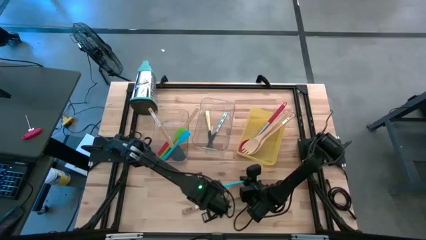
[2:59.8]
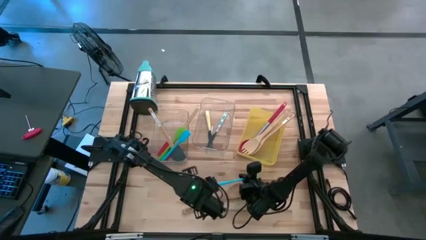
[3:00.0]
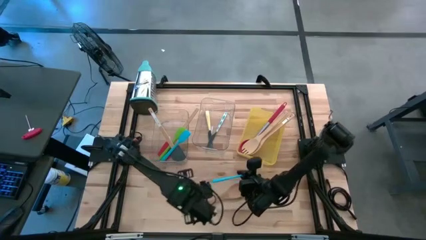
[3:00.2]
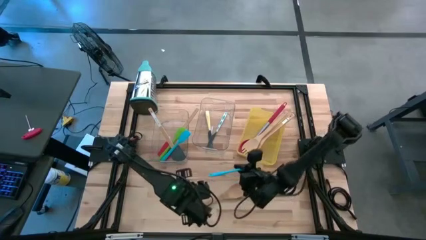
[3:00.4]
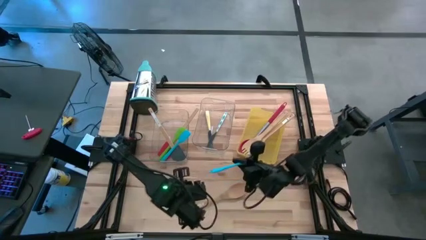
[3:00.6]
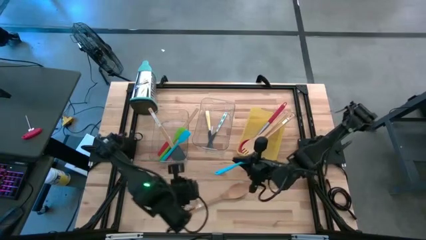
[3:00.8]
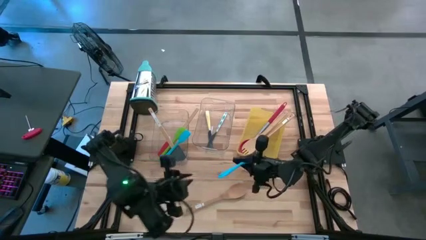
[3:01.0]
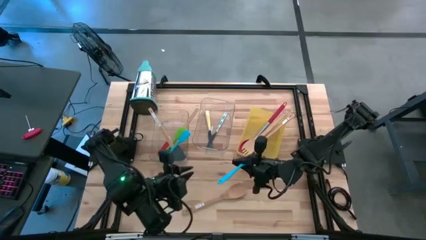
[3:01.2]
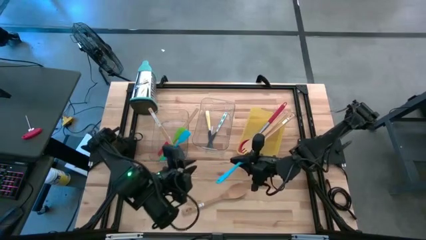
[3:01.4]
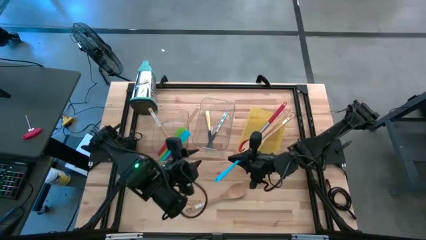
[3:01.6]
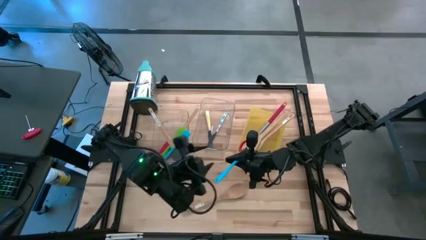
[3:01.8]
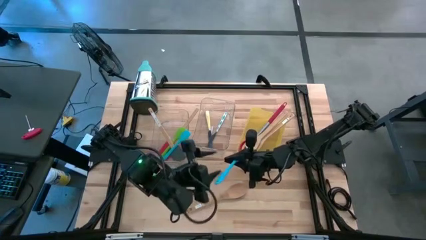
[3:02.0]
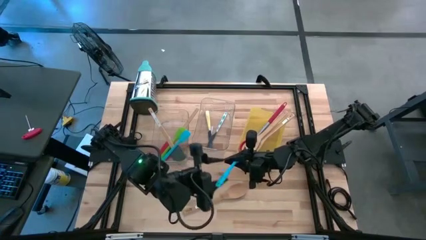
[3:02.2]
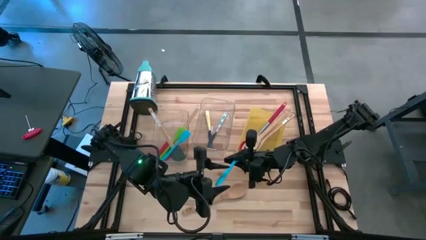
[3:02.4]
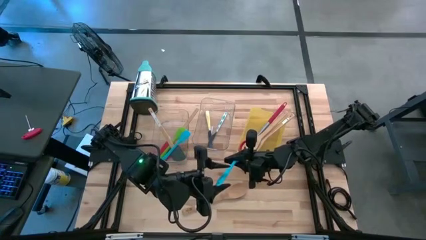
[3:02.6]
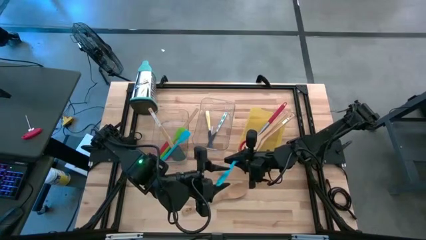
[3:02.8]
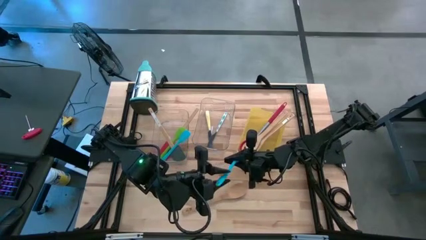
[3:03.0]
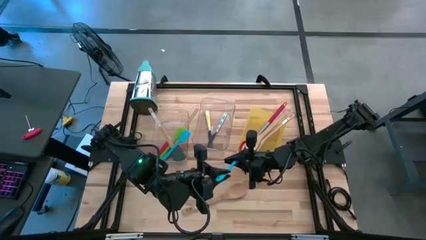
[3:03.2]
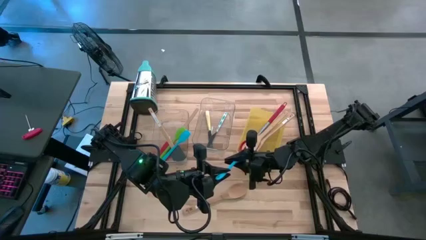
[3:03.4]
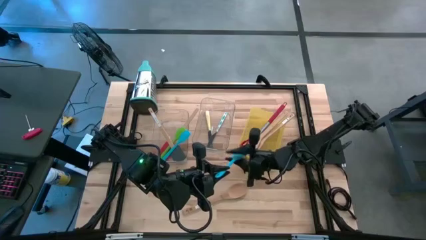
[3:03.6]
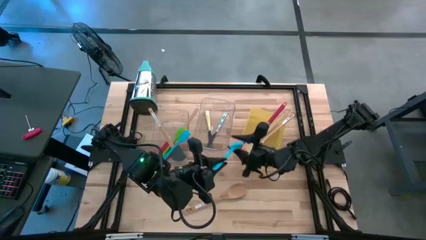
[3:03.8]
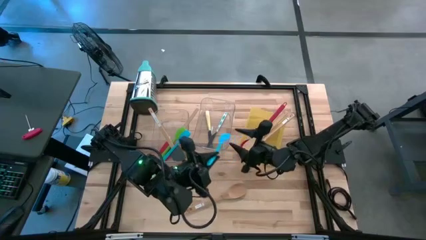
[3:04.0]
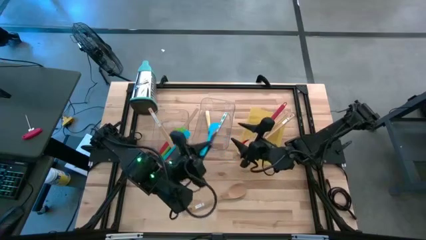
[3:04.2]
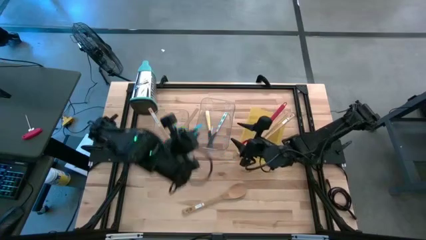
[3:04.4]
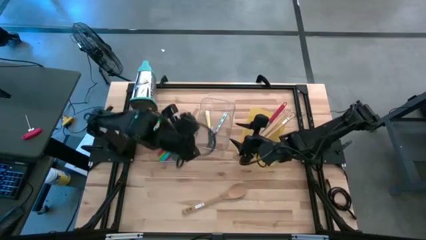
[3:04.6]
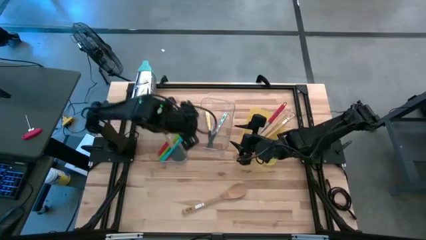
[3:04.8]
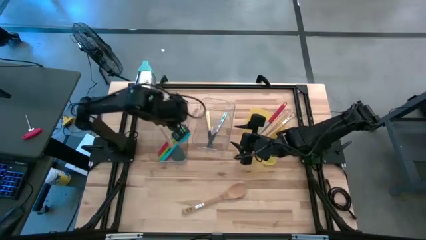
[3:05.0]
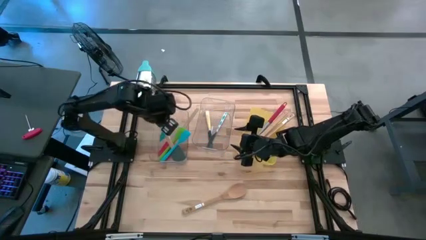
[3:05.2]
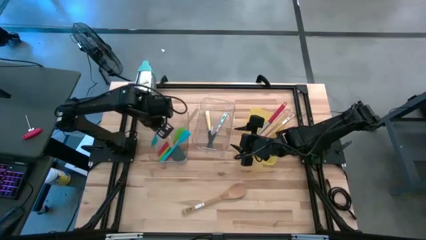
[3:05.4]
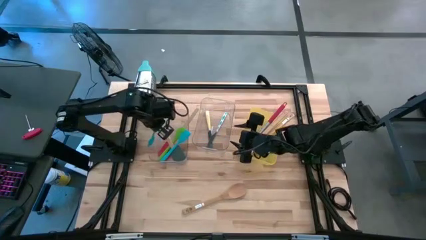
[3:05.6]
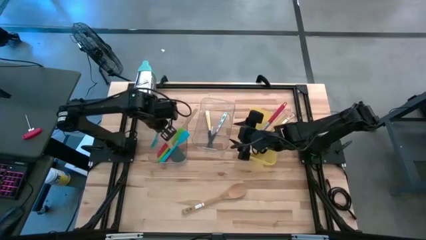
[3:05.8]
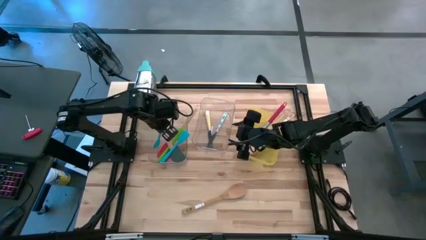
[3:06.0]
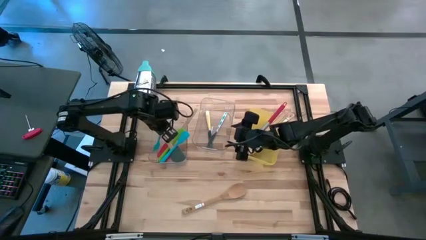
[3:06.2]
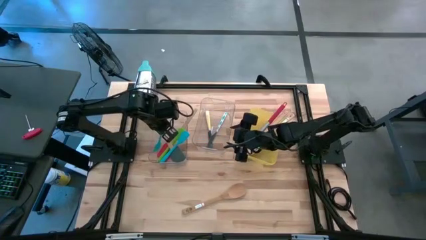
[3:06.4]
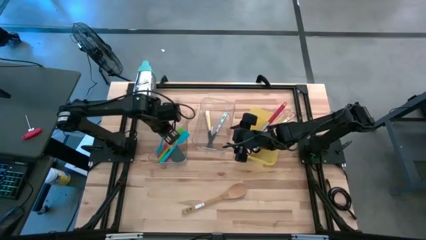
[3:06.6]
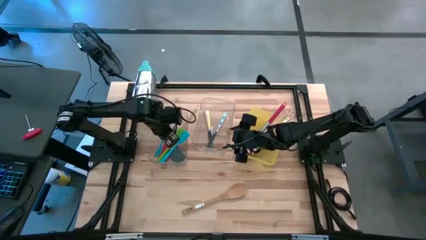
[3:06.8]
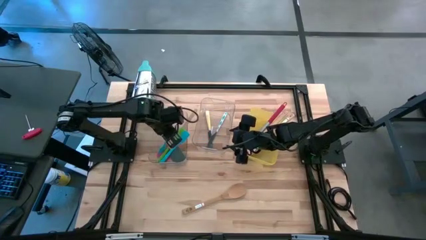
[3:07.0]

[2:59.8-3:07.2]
Task: Pick & Place Kitchen Items
Put the blue spatula into the left transparent bin

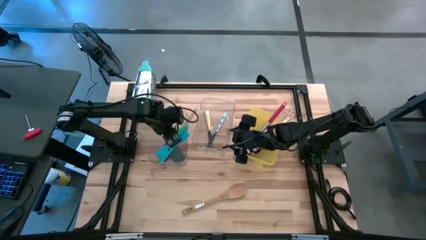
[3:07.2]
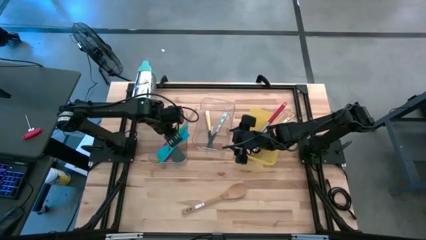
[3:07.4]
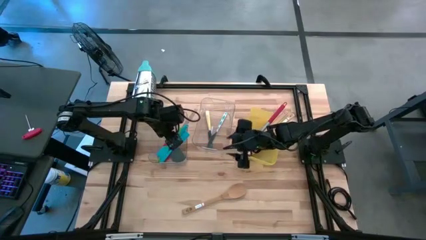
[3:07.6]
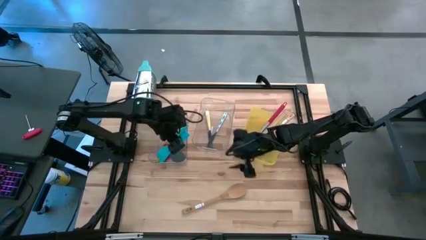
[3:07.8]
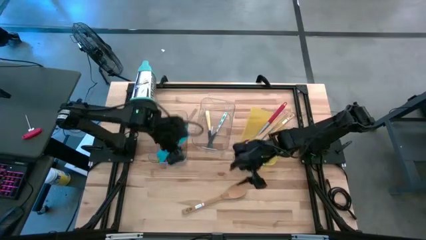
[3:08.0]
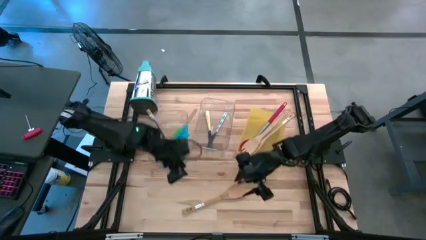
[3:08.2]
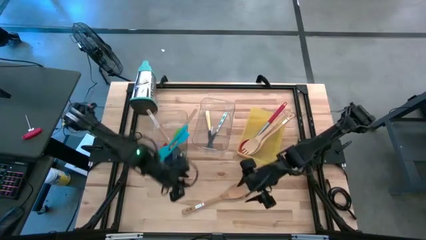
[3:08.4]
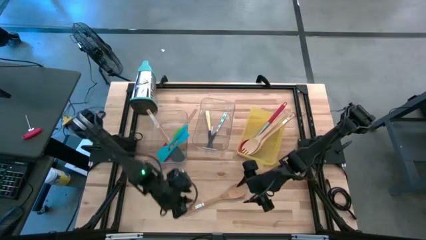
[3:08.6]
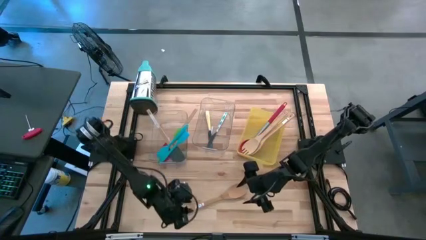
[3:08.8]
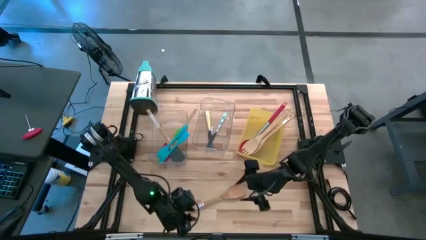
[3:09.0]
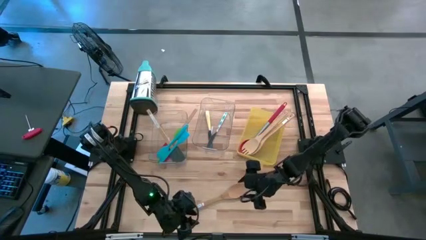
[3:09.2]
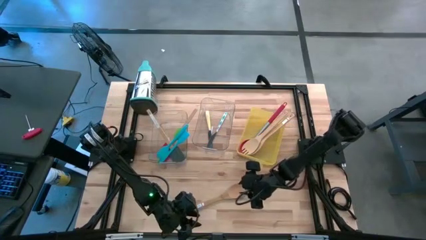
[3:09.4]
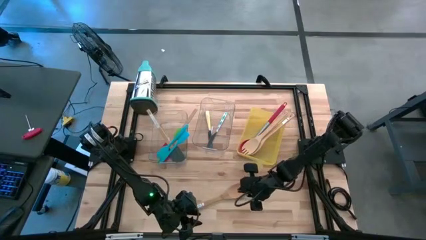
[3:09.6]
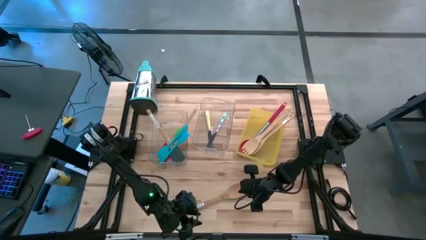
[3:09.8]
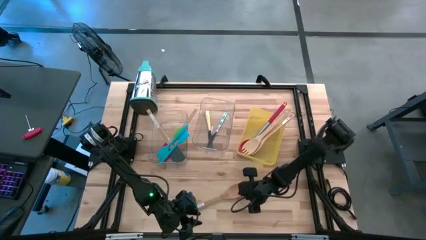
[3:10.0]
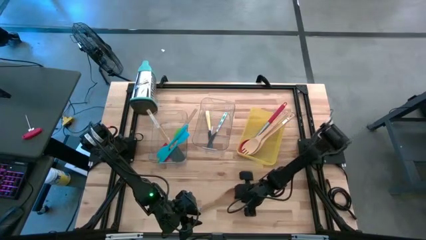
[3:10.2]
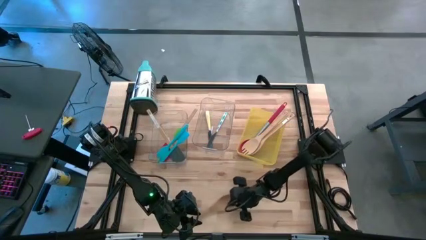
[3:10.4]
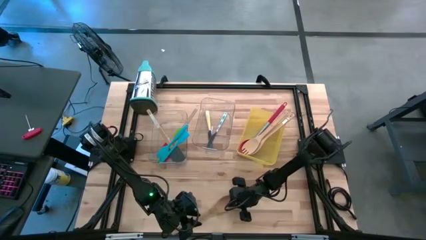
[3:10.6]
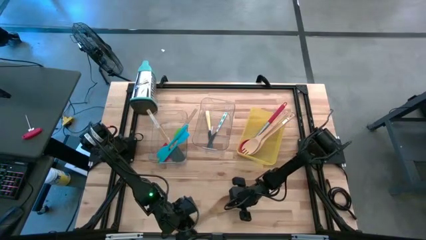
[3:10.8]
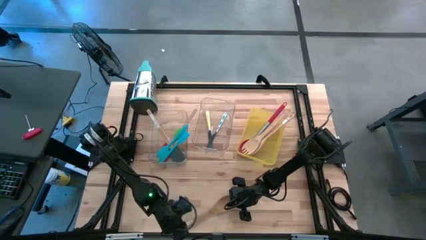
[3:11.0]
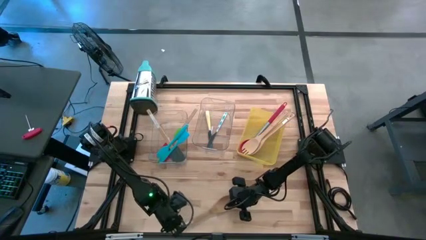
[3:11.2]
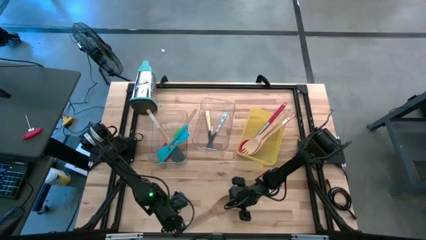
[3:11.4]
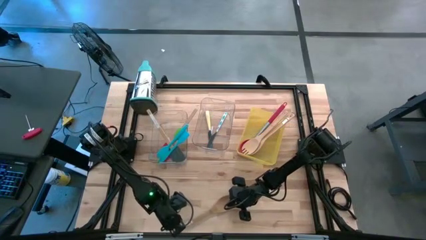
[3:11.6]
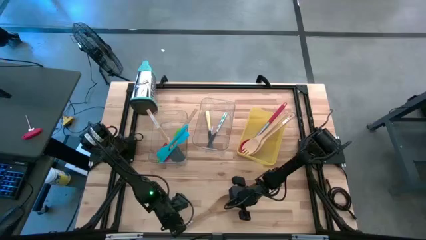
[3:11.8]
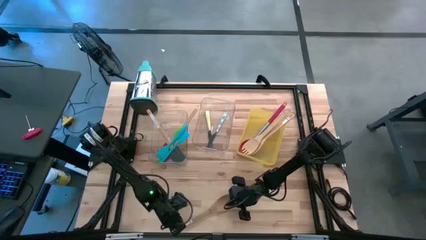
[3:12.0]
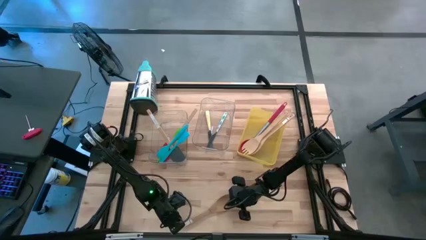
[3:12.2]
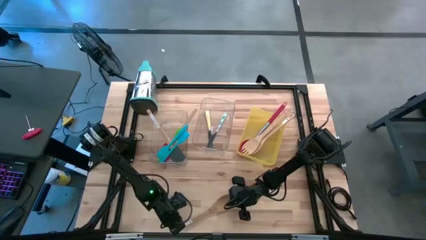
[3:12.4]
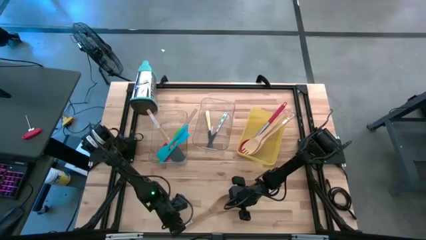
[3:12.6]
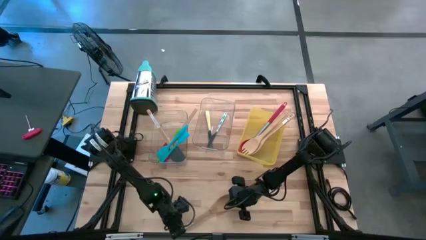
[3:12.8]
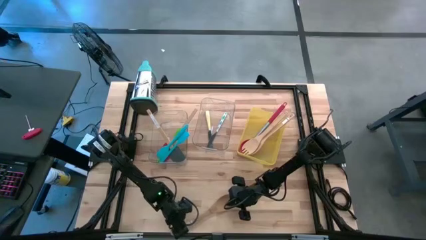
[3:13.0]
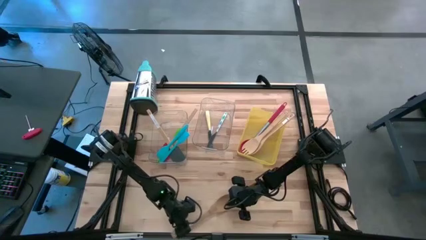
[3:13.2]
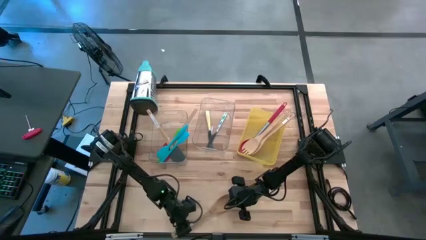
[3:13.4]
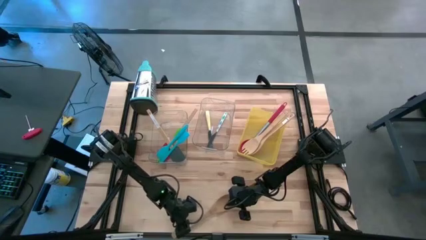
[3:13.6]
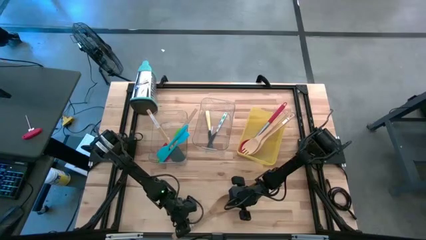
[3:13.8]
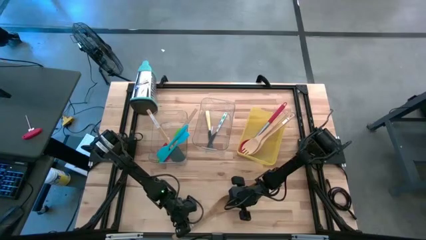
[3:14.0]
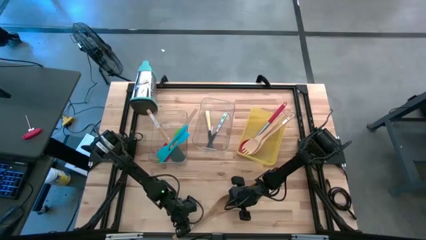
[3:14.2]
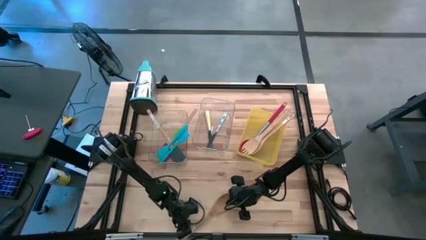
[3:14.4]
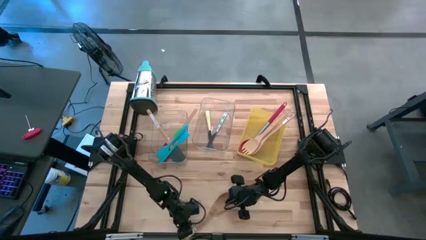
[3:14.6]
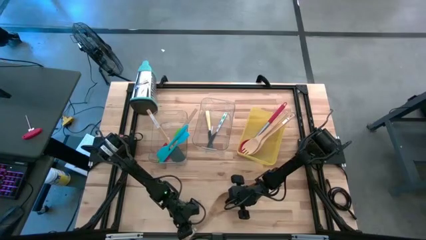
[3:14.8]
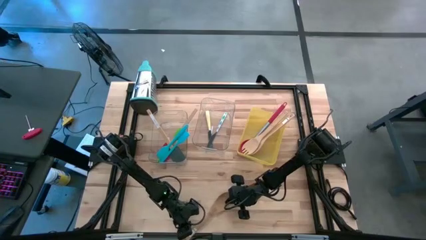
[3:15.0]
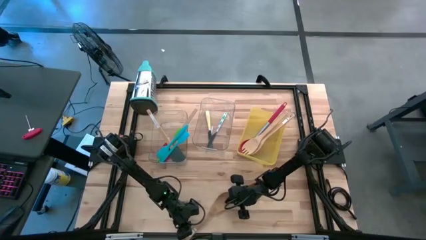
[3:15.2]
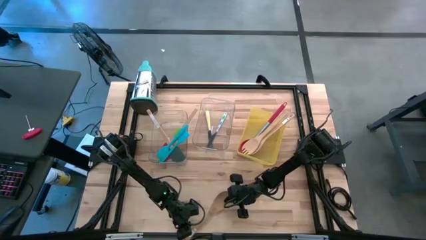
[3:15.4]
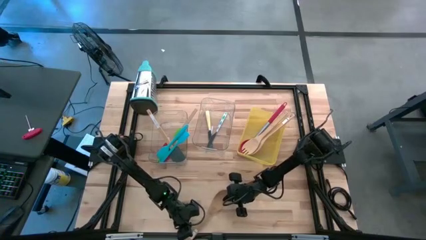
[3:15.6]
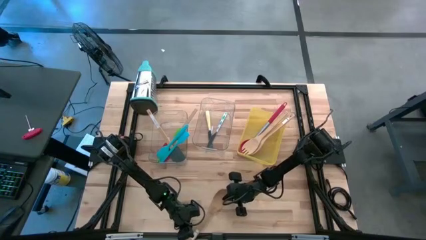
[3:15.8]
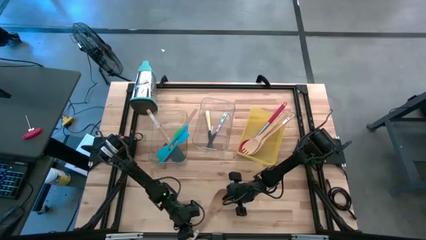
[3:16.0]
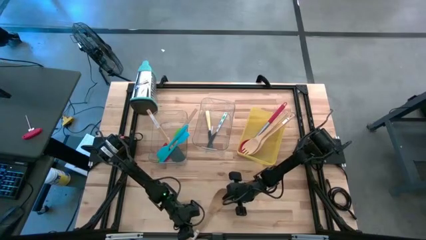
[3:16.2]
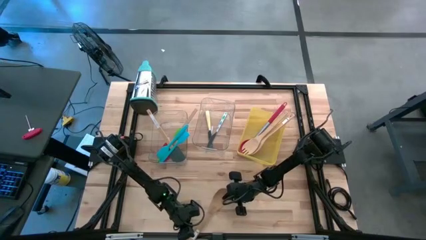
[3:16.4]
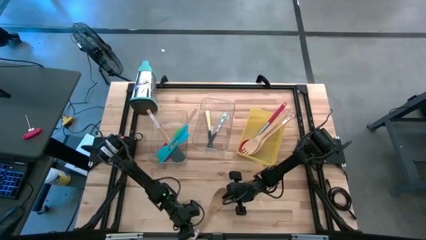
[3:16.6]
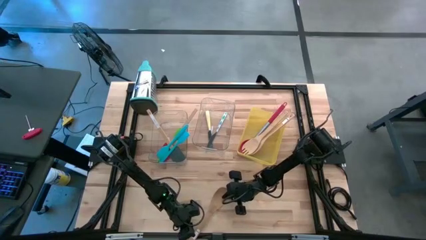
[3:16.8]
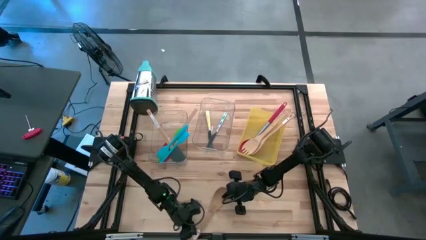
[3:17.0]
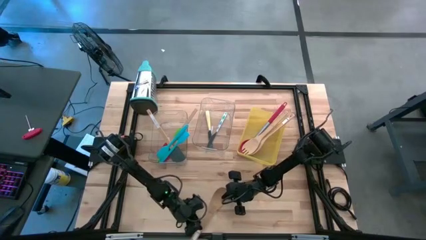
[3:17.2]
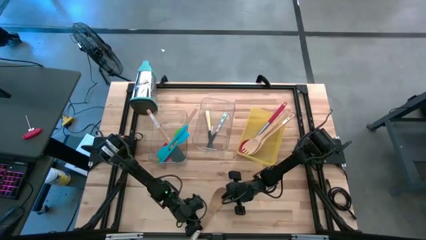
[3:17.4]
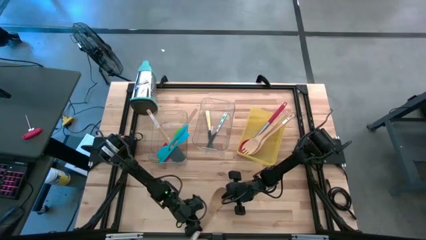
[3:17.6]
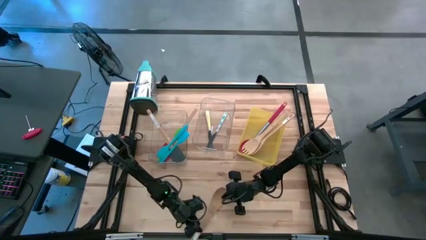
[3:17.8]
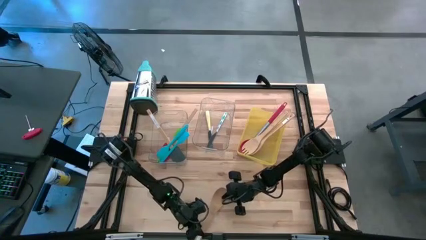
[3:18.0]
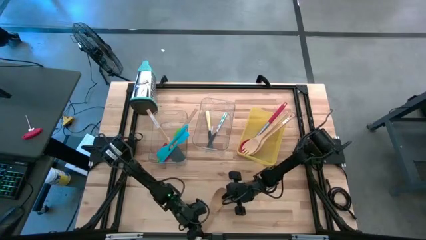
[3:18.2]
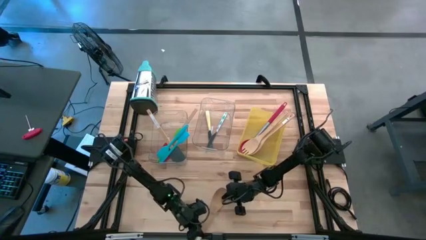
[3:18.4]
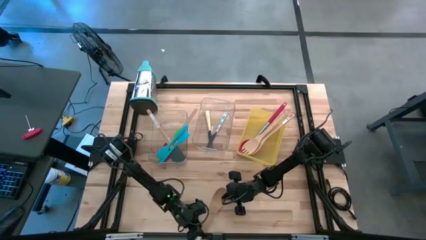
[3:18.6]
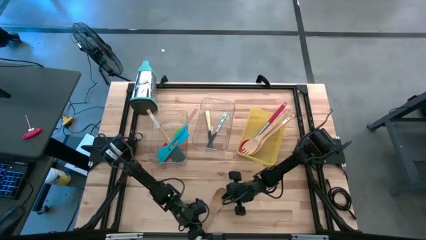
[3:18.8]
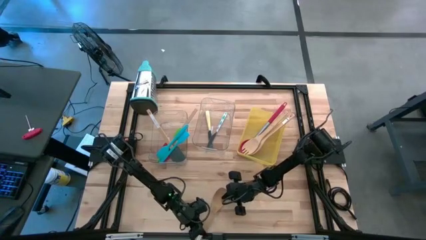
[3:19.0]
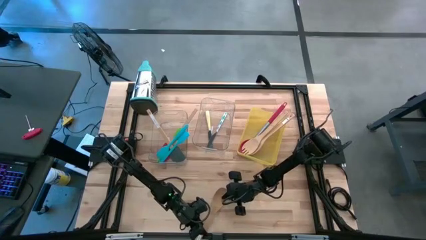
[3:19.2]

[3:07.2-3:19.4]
Put the brown serving spoon into the yellow bin
